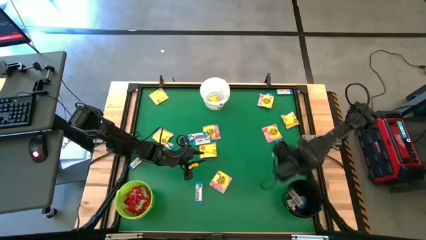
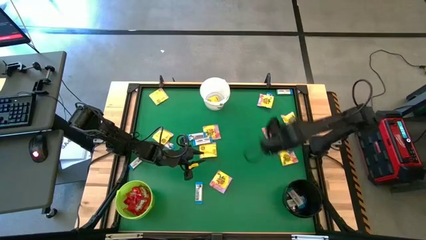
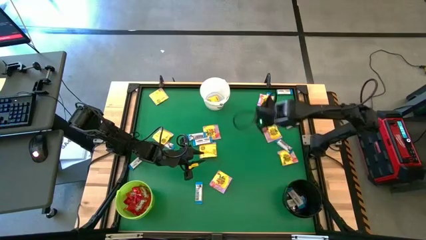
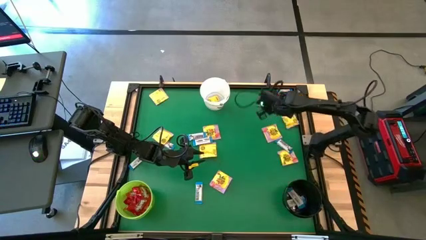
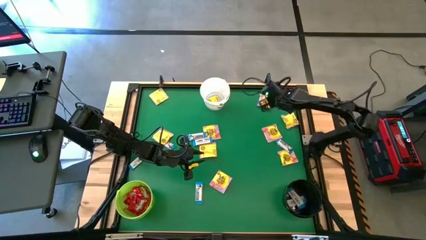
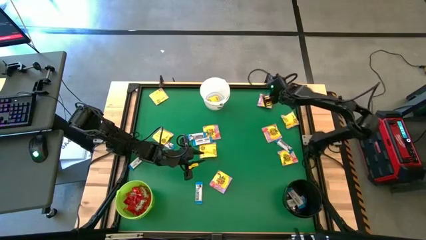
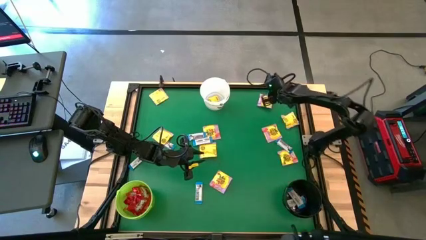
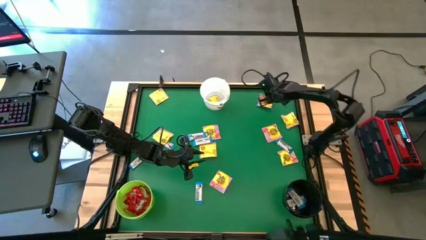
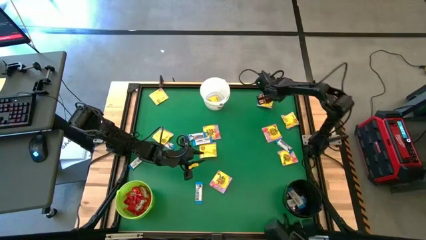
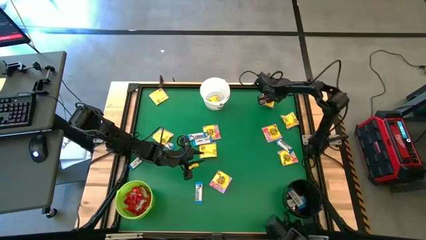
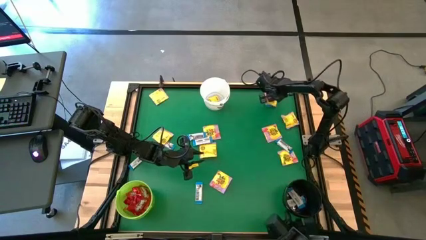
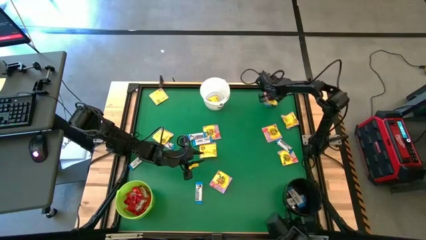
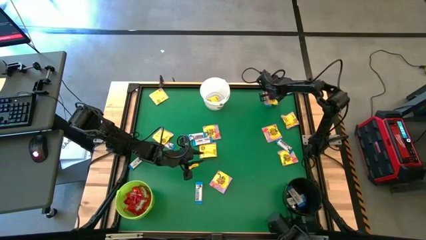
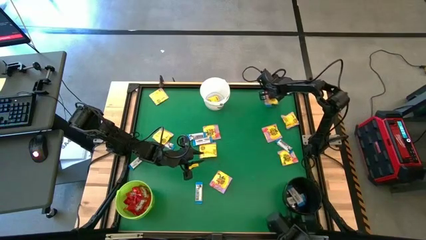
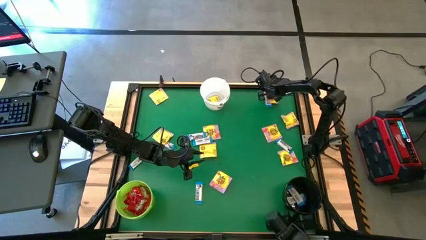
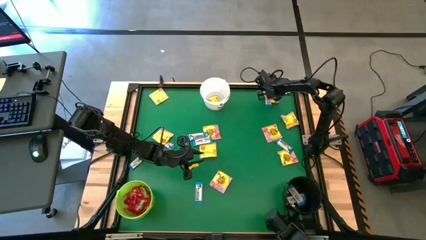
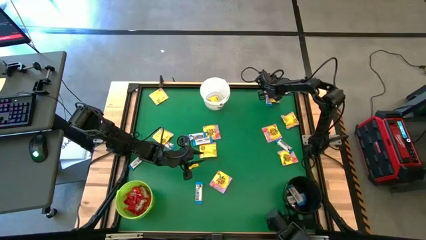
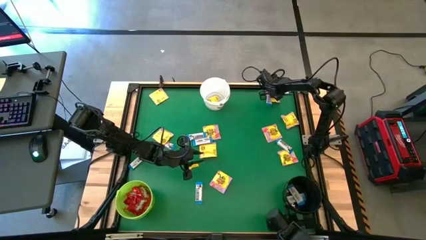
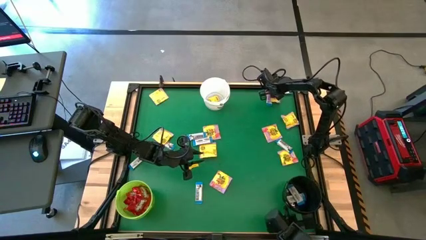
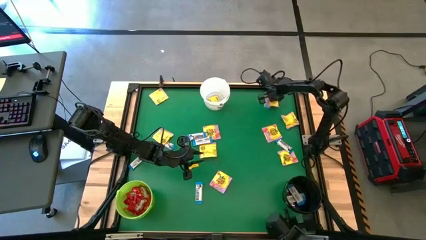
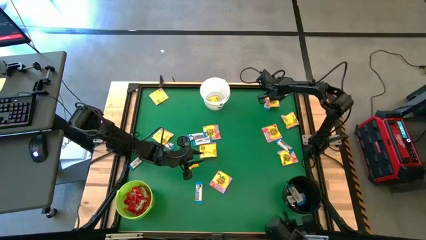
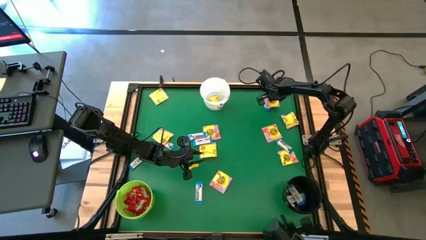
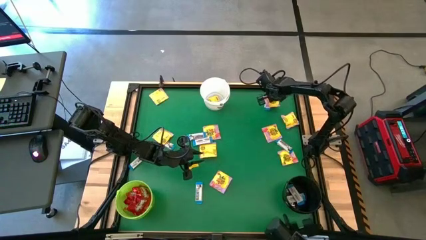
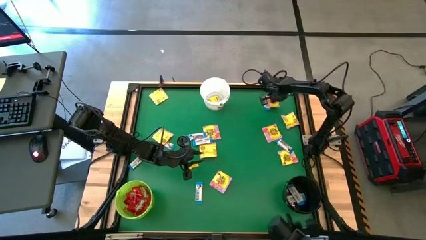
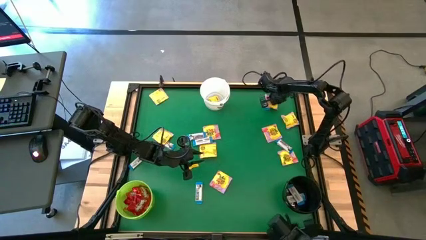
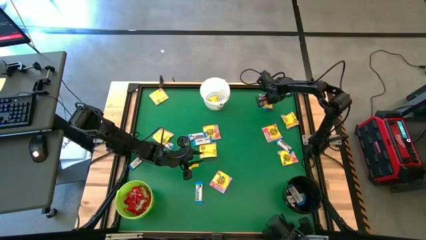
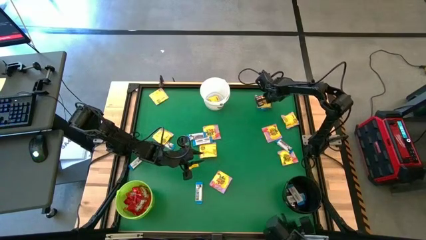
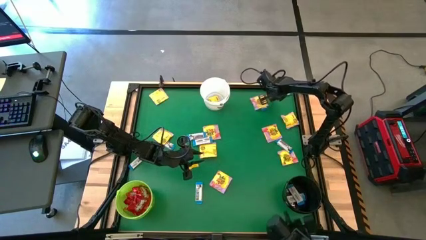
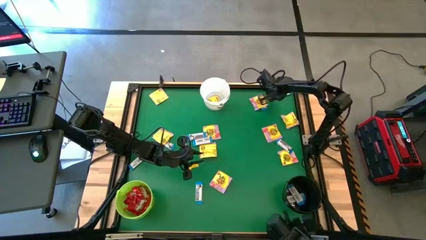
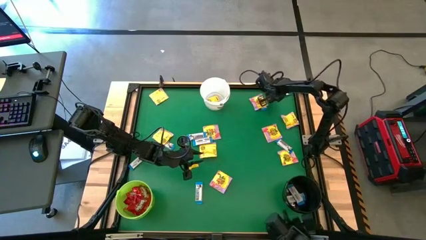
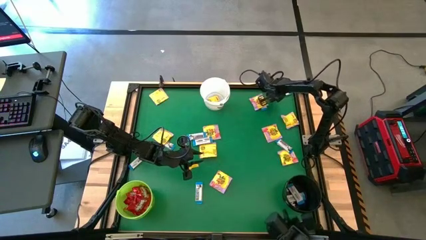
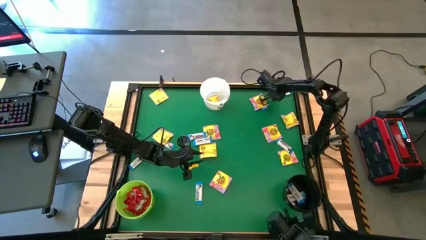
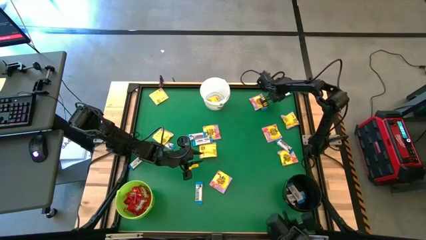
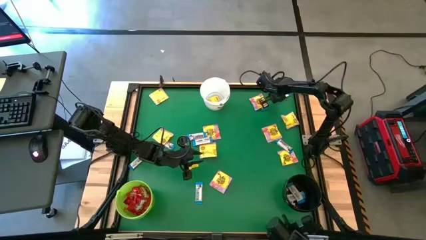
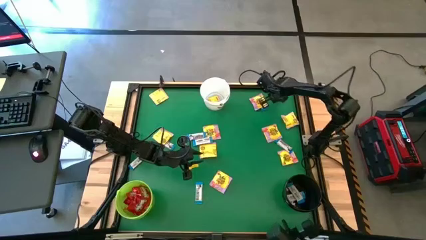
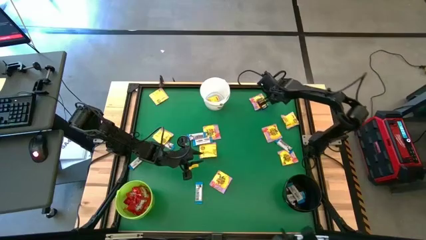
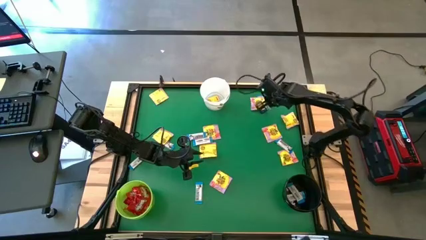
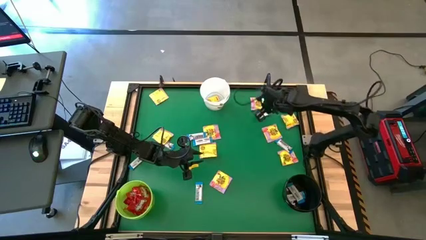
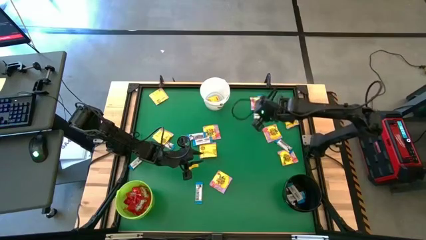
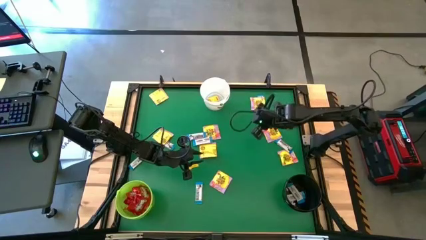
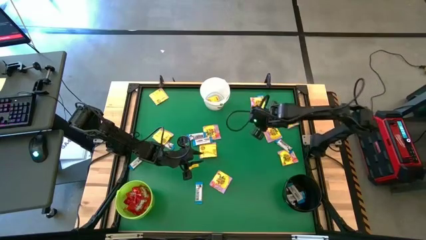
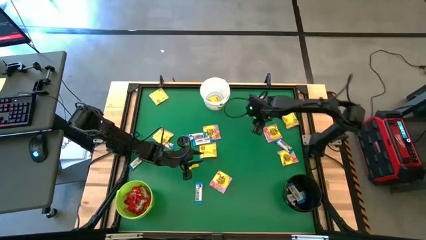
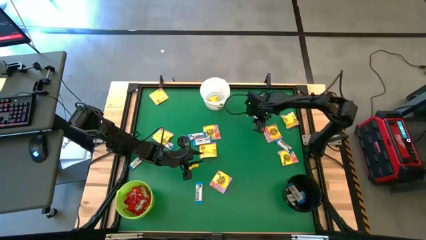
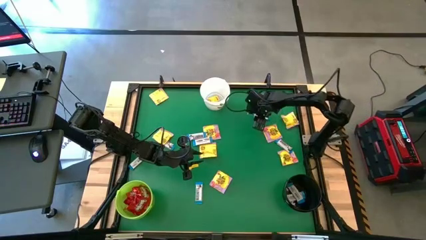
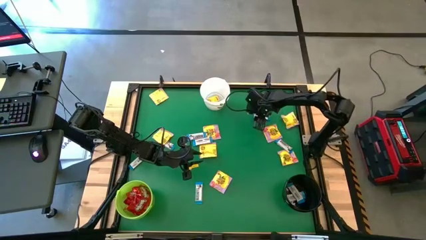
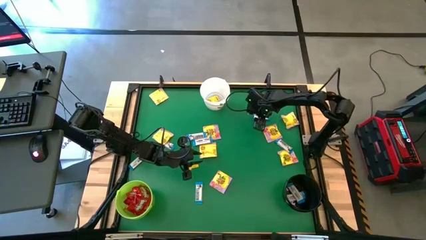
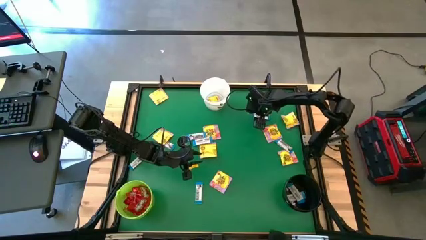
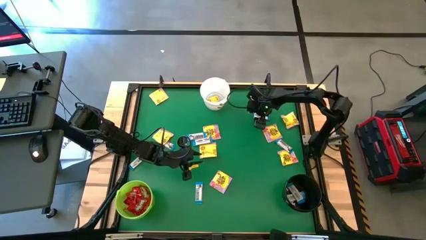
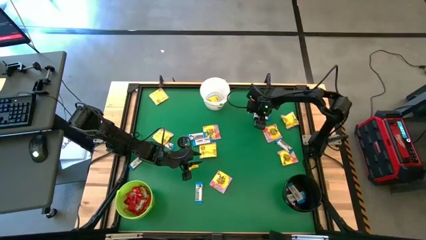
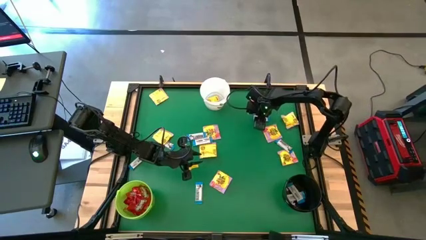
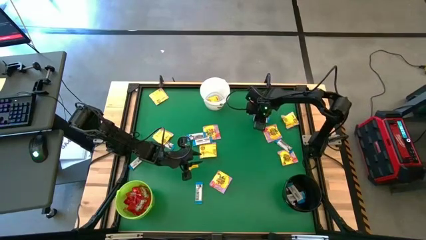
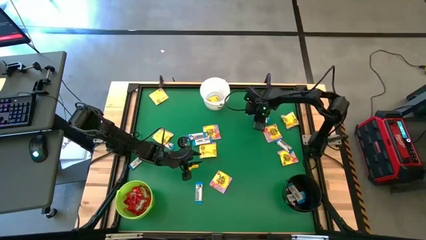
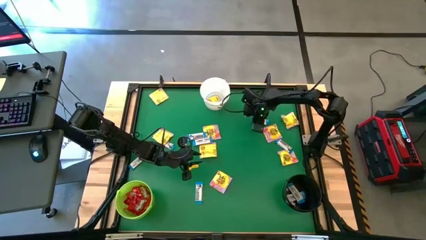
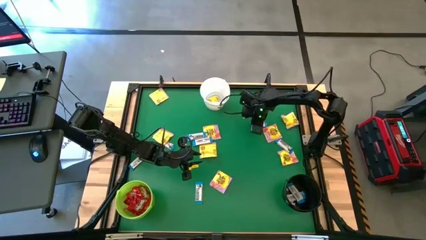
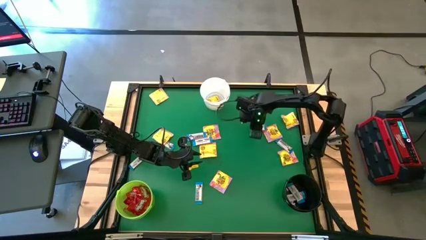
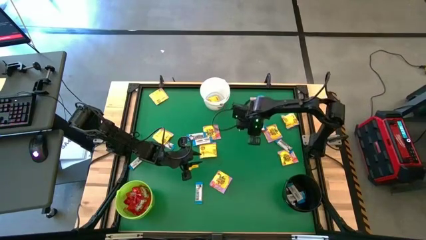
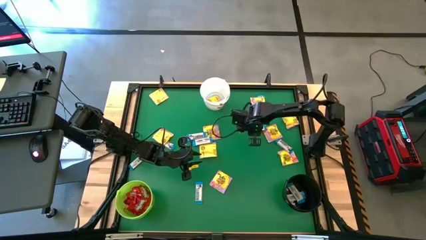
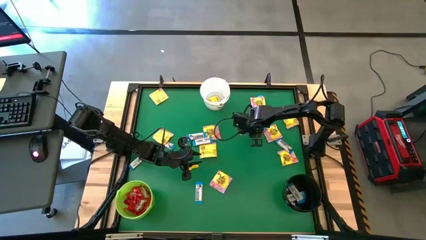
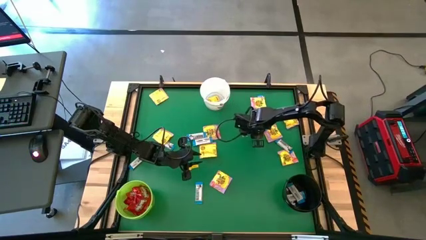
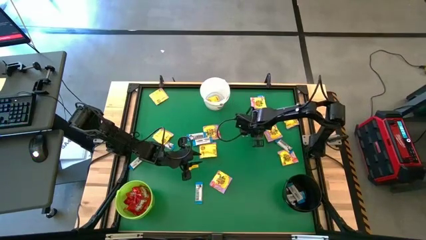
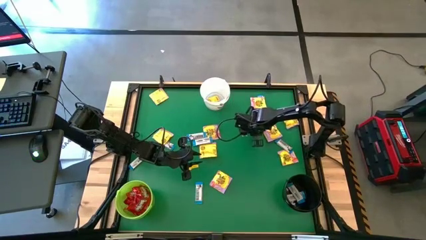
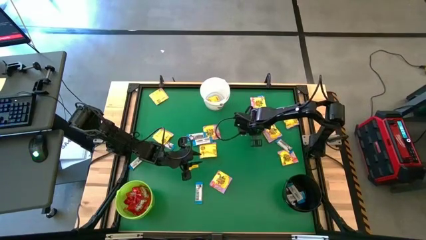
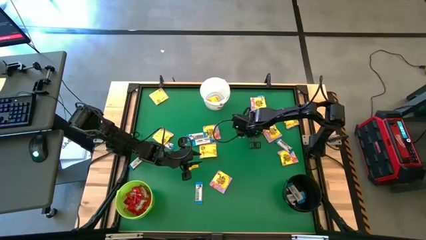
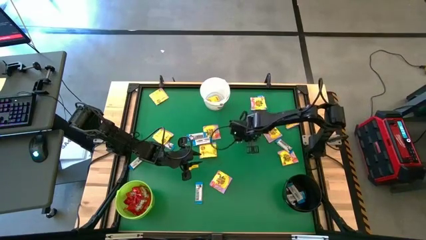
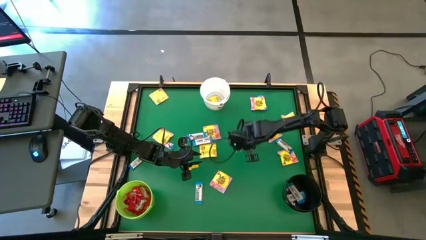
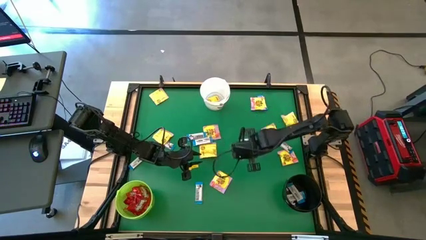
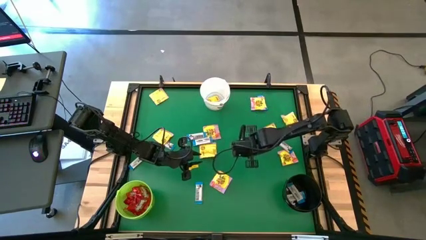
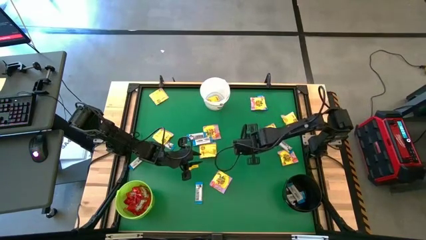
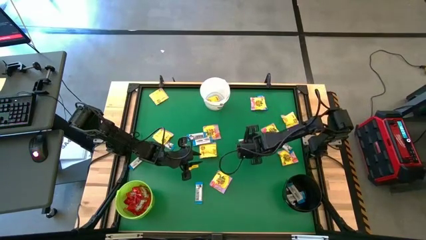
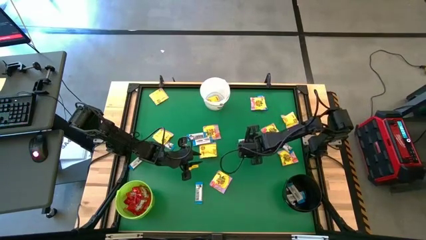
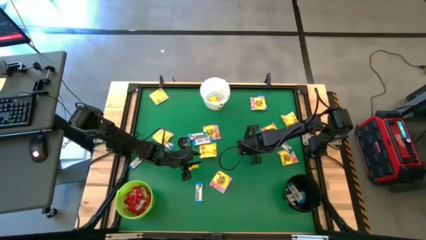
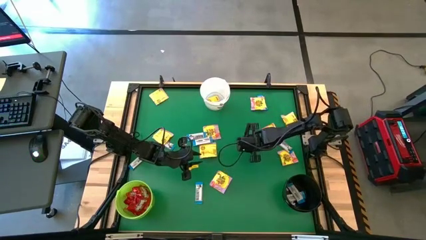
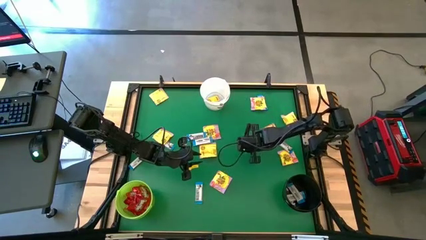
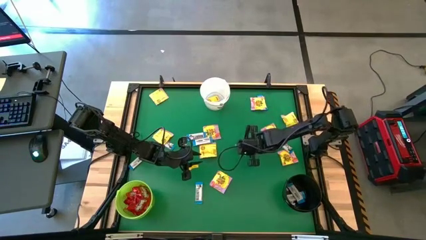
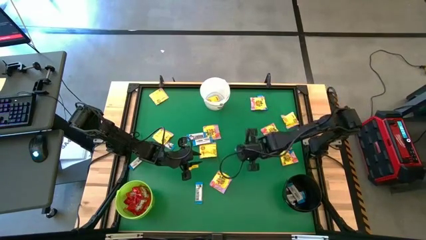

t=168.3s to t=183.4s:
Task: Sort candy by brand, put in halloween buckets
Put the white candy into the black bucket

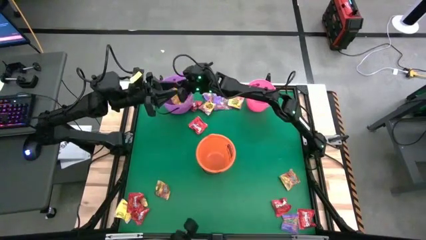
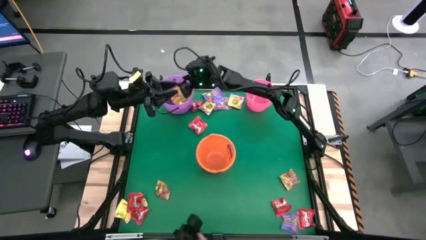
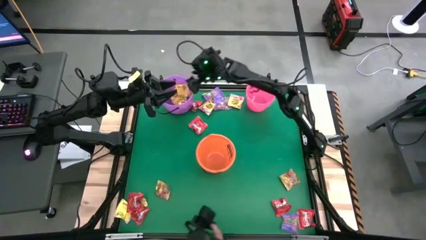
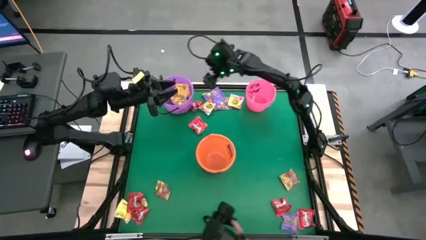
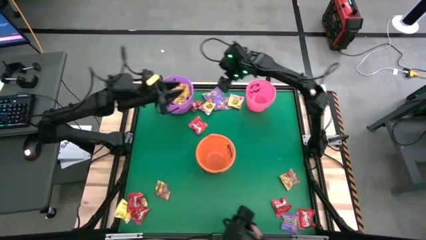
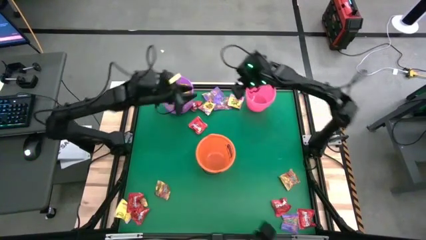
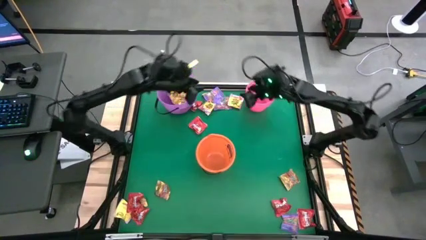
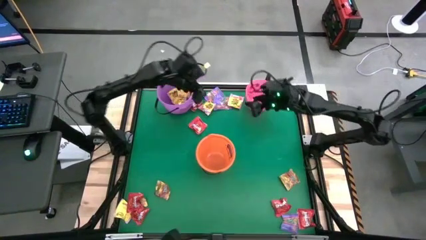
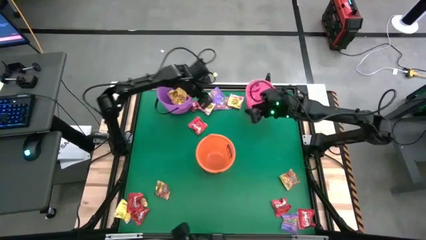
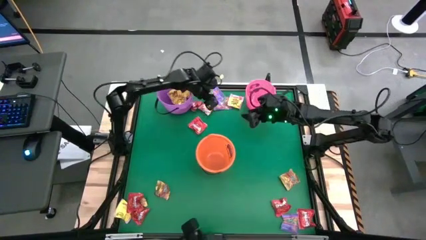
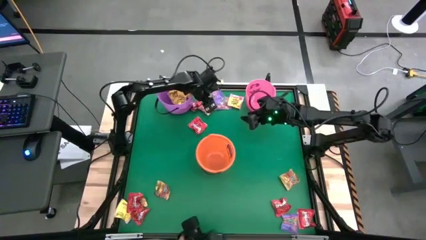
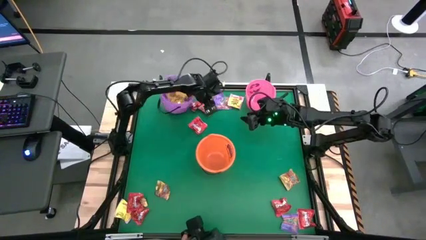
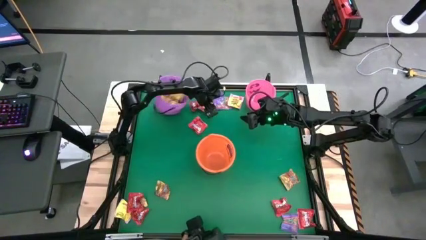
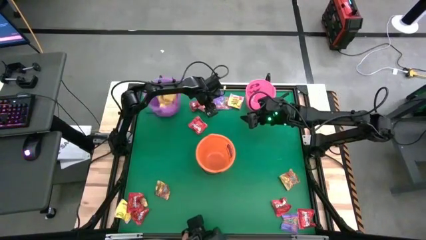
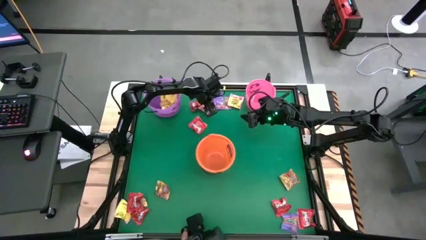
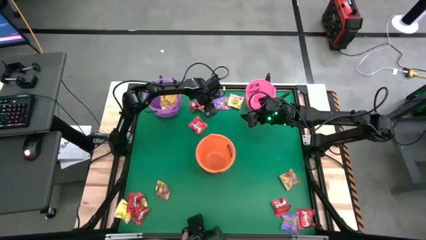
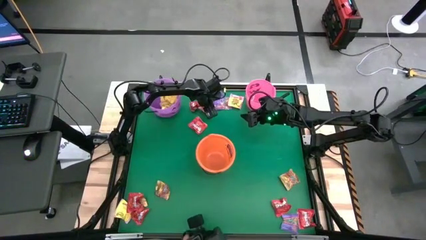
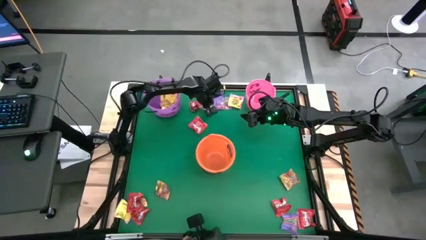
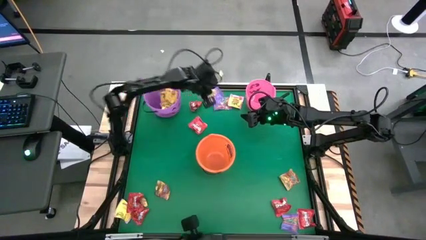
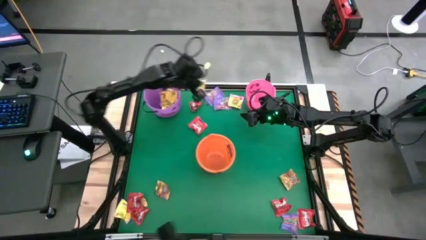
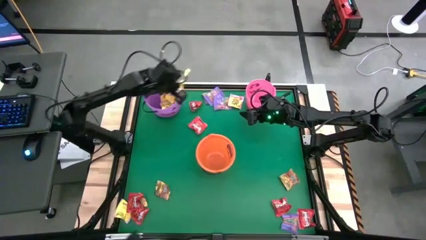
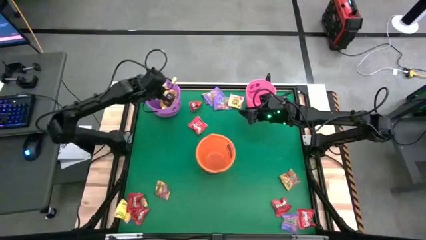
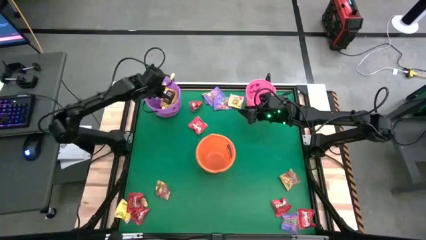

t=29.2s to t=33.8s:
Task: Sort candy by brand, put in halloween buckets
Put the yellow candy into the light violet bucket
